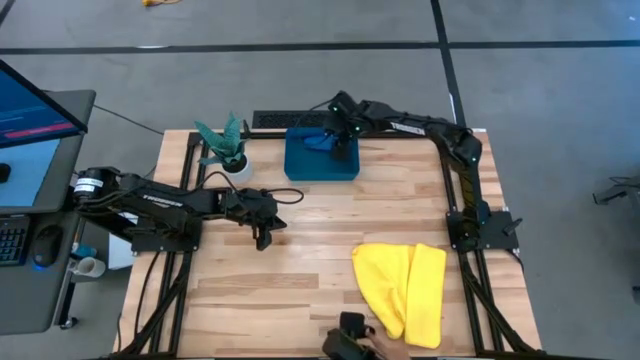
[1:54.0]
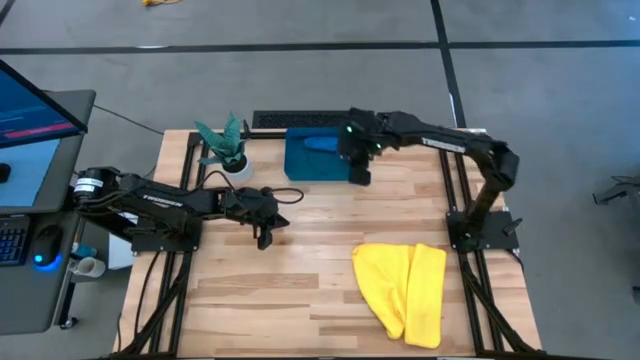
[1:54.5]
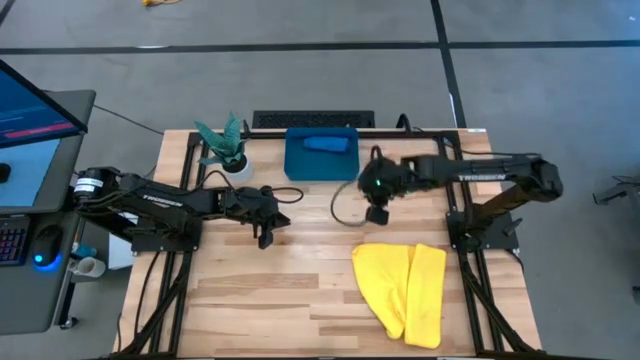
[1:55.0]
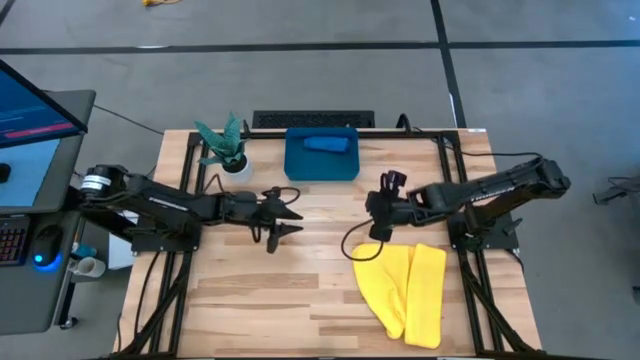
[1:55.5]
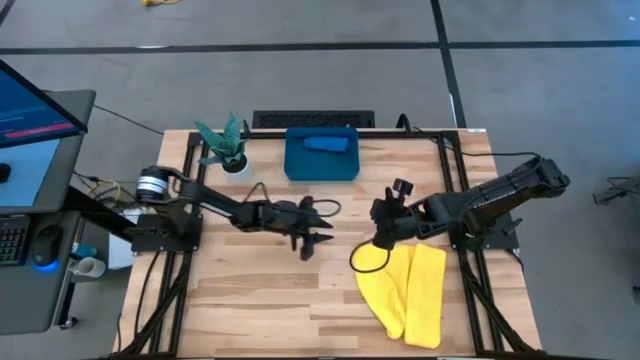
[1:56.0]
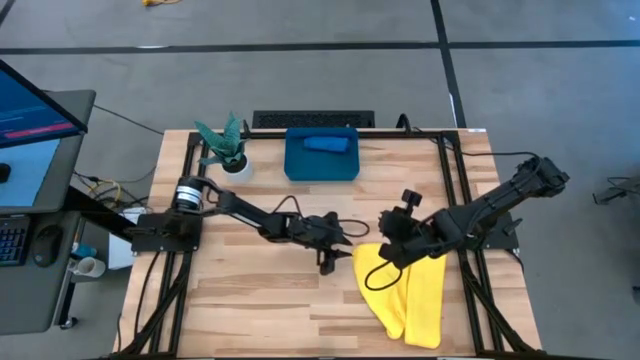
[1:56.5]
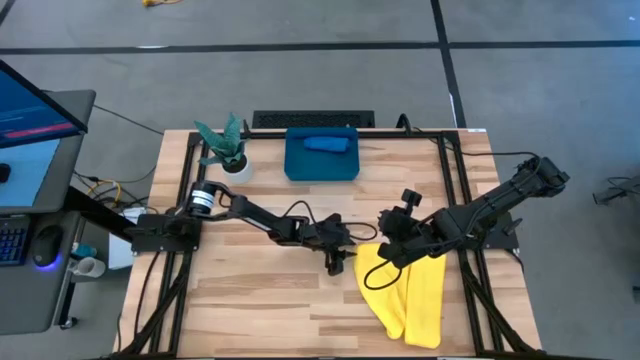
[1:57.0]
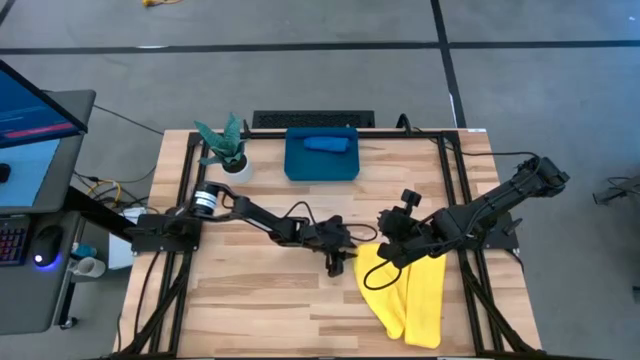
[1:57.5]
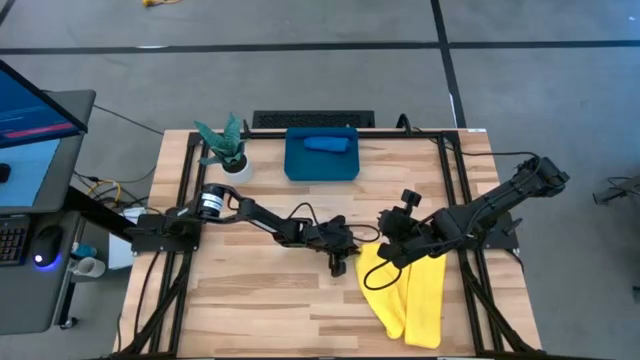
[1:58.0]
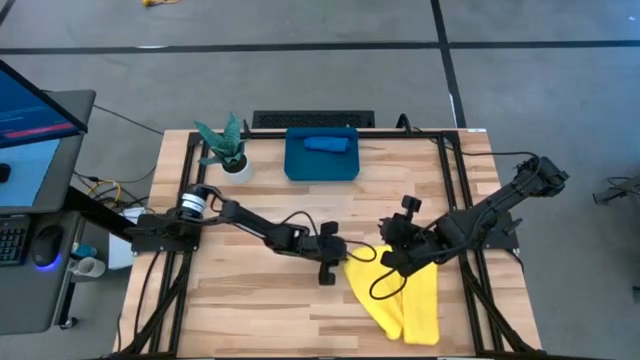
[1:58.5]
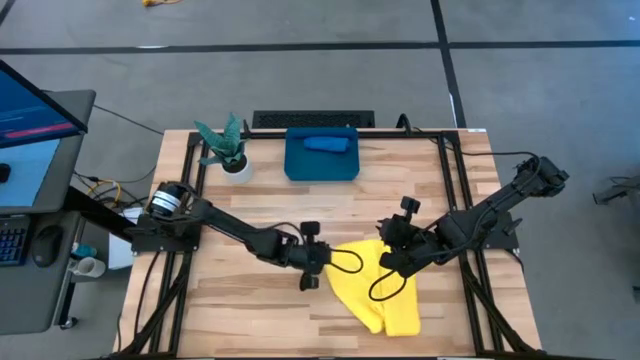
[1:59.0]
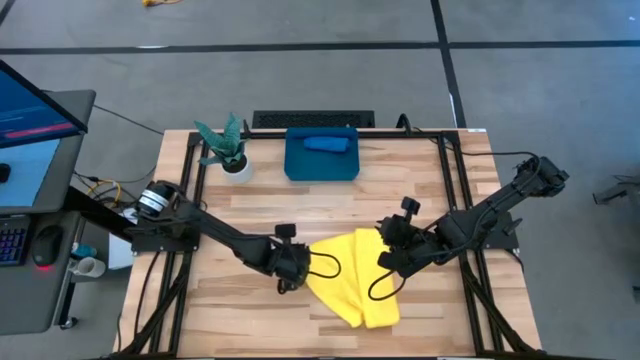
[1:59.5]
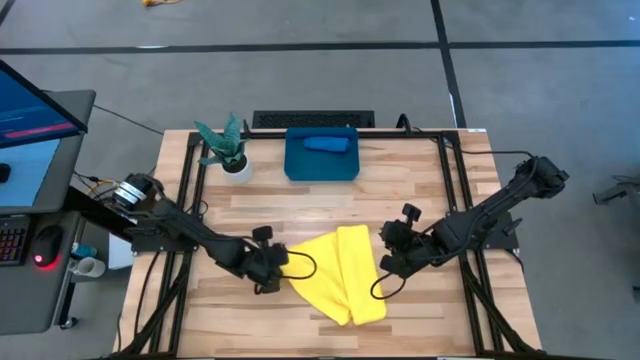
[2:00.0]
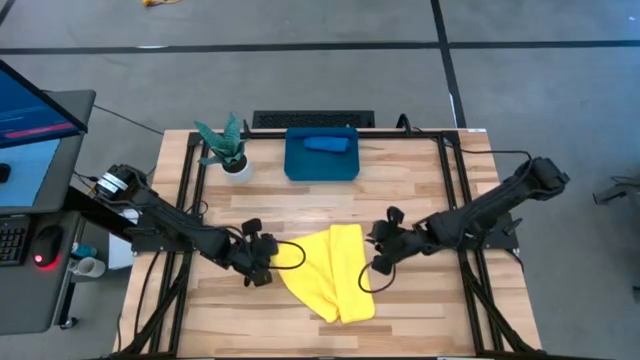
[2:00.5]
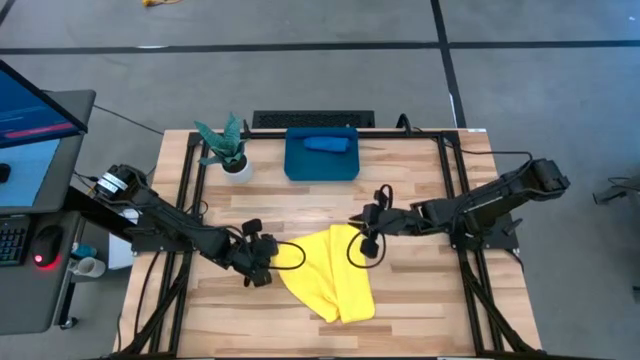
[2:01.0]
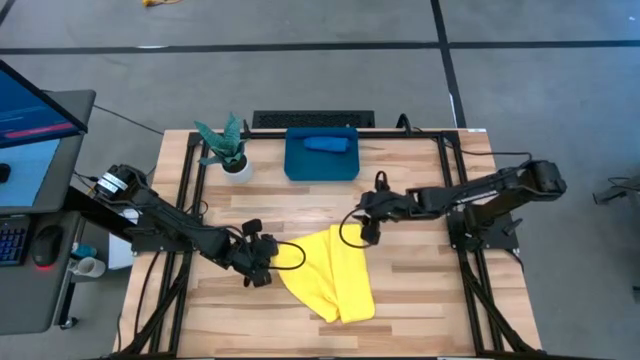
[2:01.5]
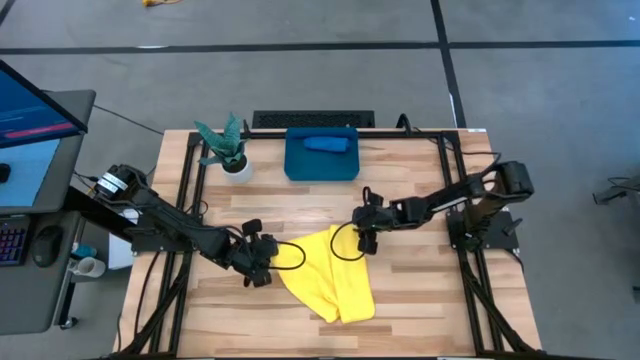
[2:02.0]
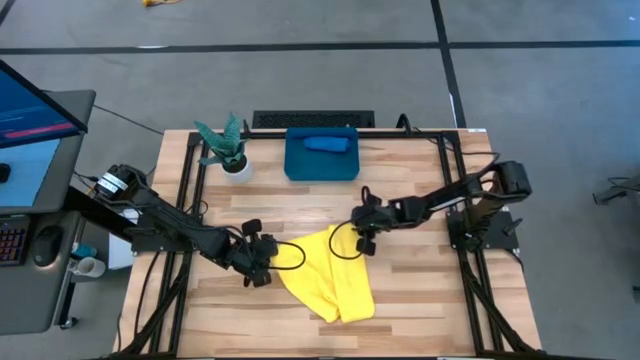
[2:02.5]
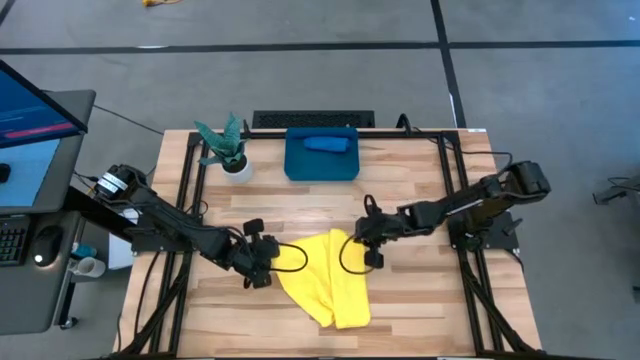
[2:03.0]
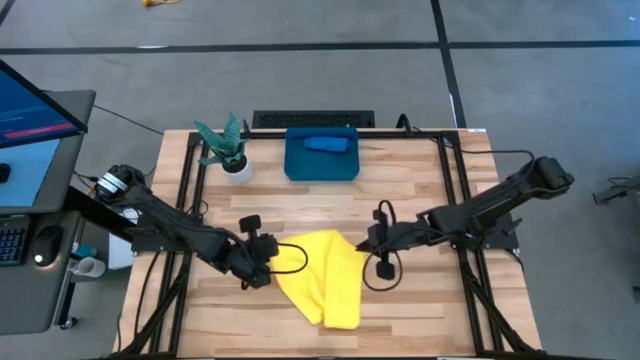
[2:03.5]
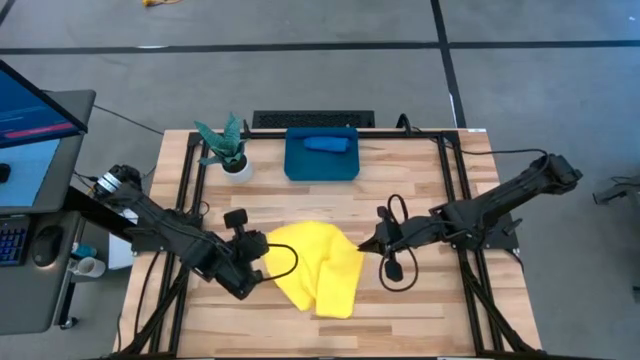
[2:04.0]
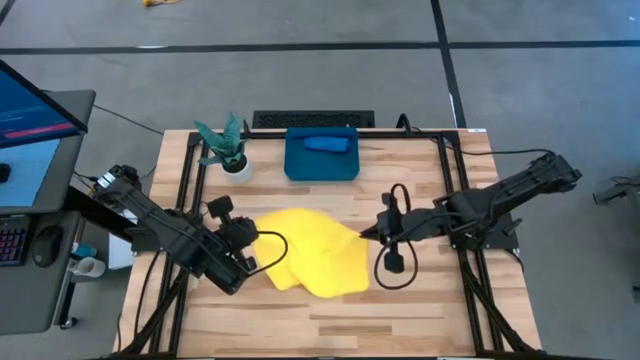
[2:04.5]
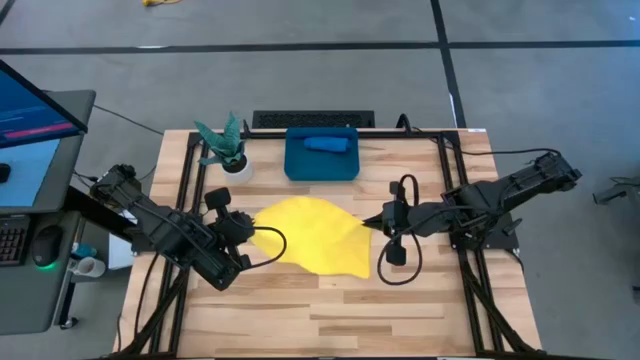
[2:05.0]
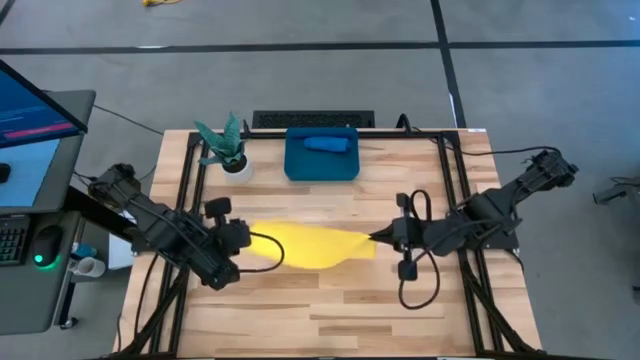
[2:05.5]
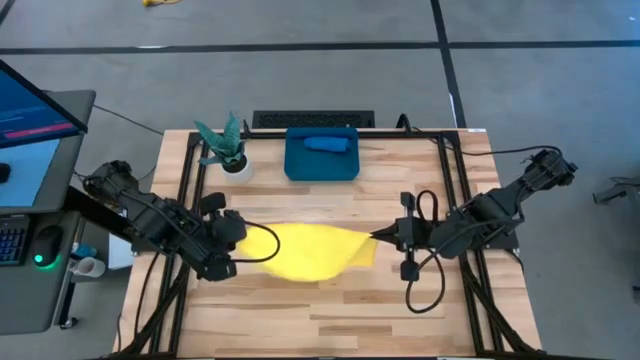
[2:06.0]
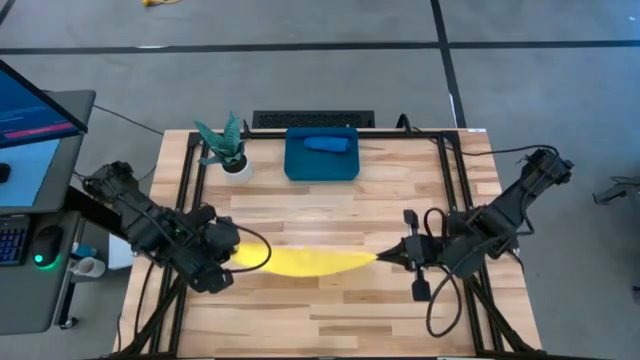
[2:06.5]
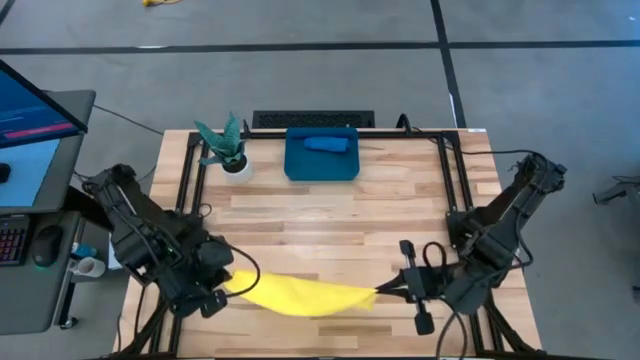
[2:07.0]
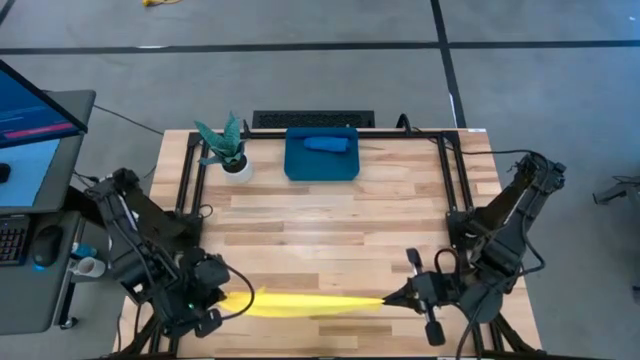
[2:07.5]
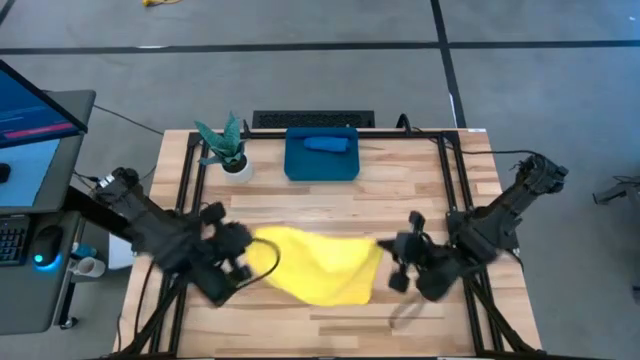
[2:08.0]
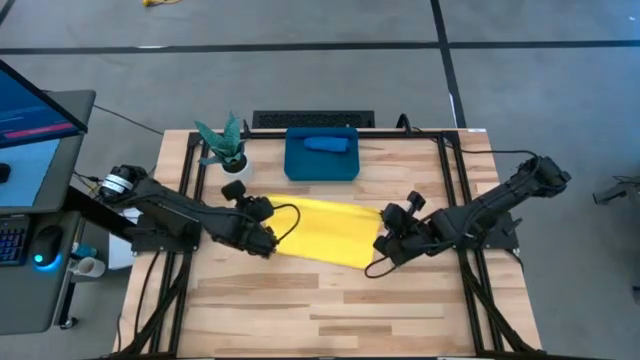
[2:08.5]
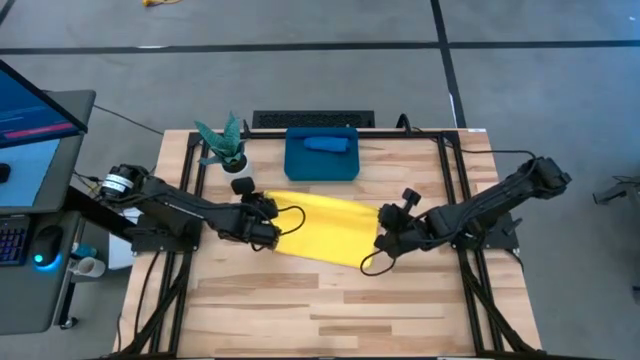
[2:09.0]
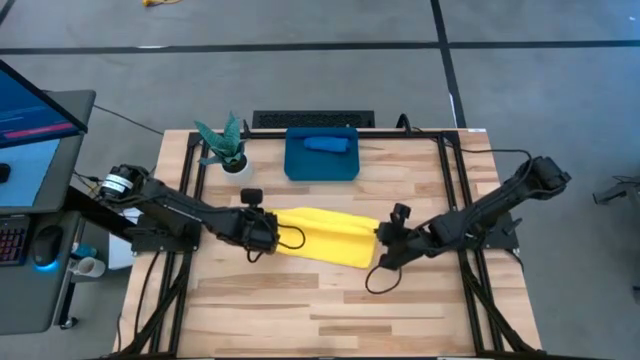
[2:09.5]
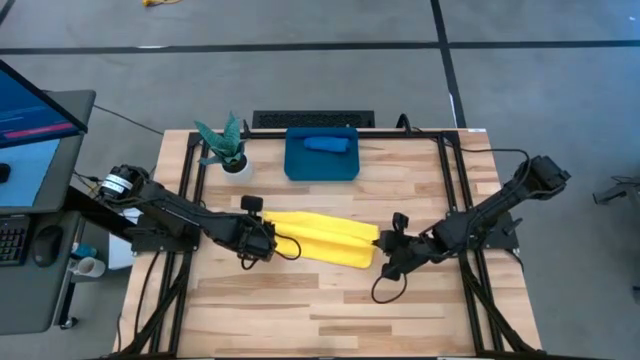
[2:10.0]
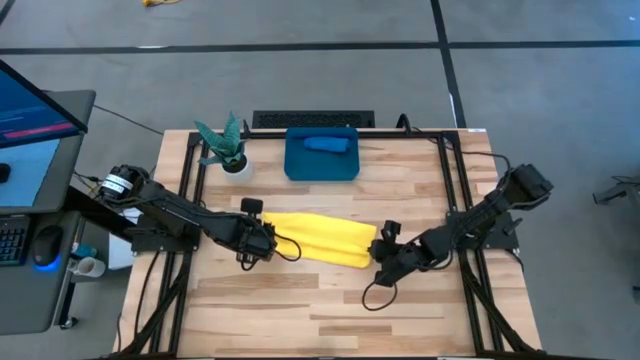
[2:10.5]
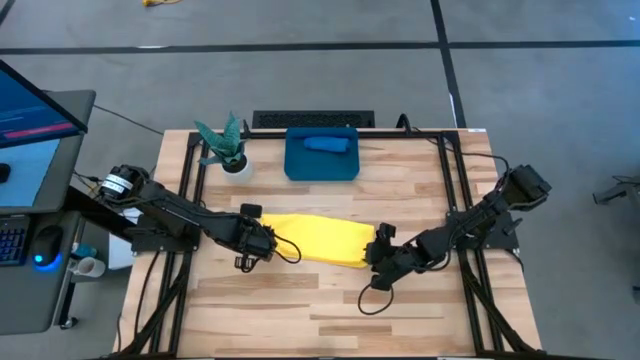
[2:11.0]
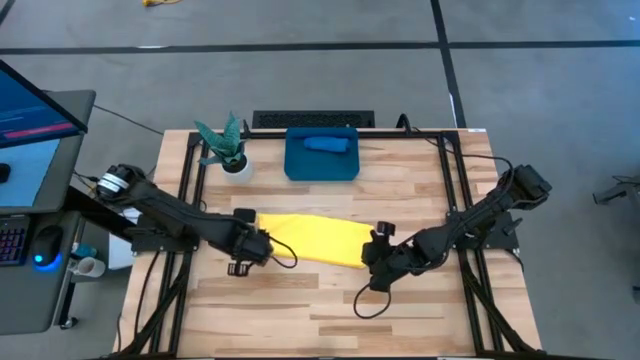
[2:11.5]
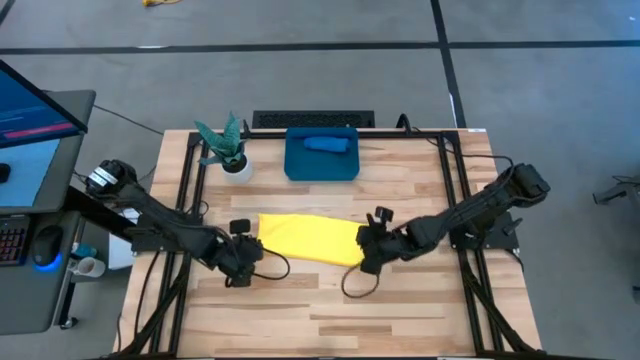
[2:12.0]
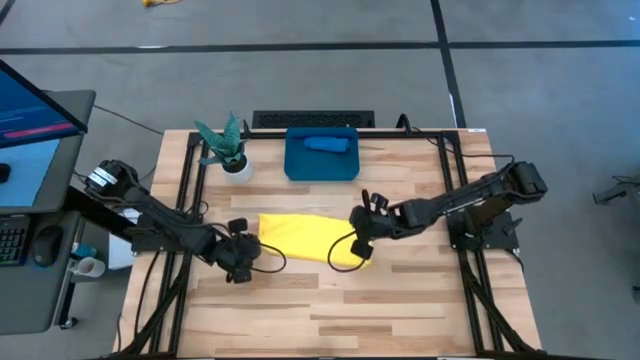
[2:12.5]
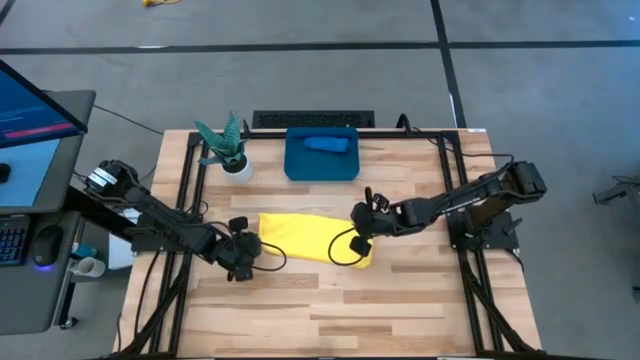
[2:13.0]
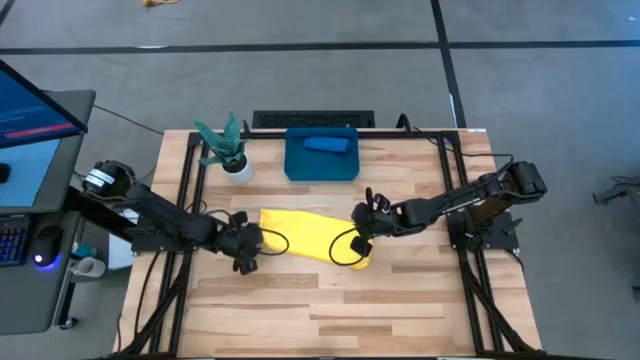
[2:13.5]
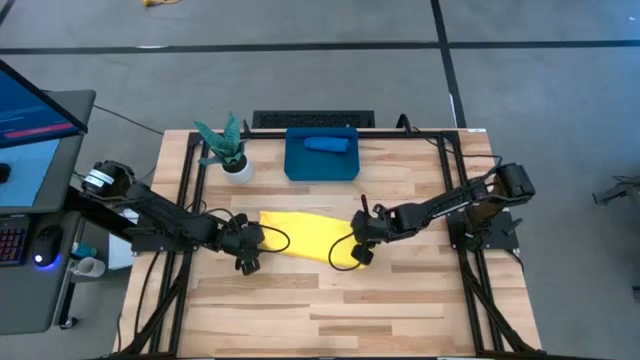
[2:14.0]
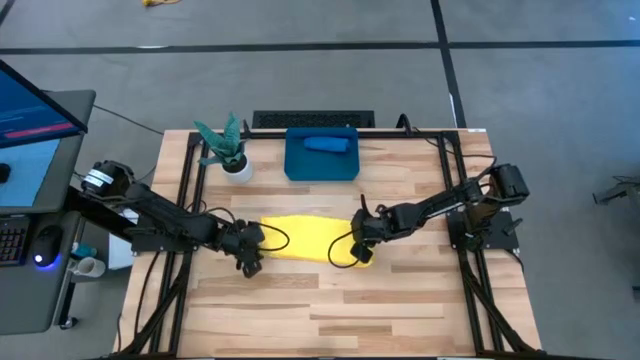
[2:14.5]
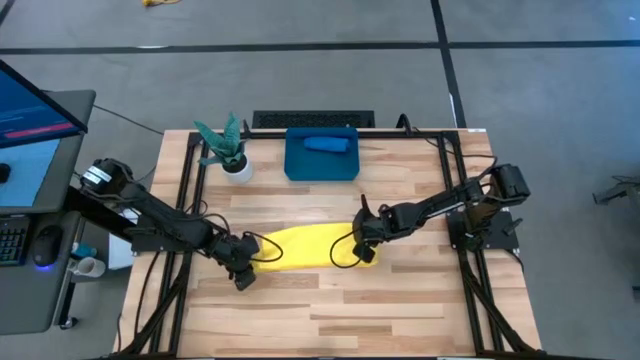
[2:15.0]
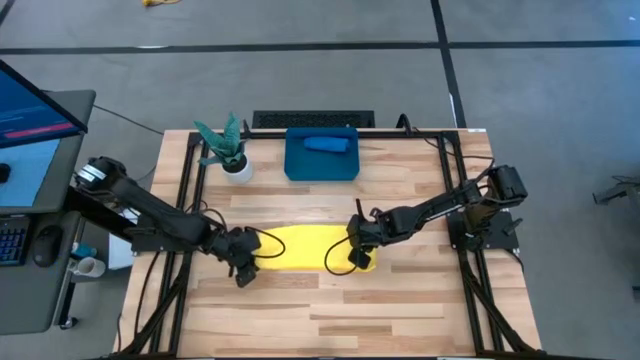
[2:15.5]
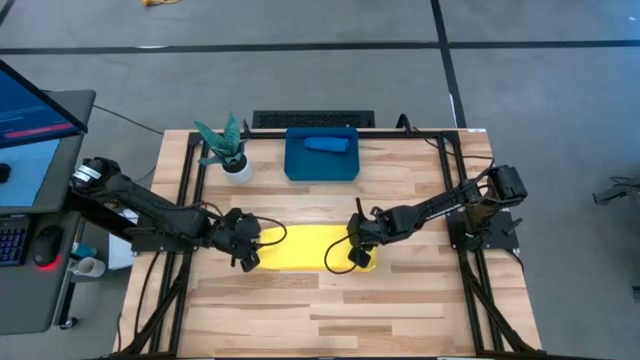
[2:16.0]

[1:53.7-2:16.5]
Task: Roll microfiber towels into tight, uniform cylinder then place into a basket
Fold the yellow microfiber towel
